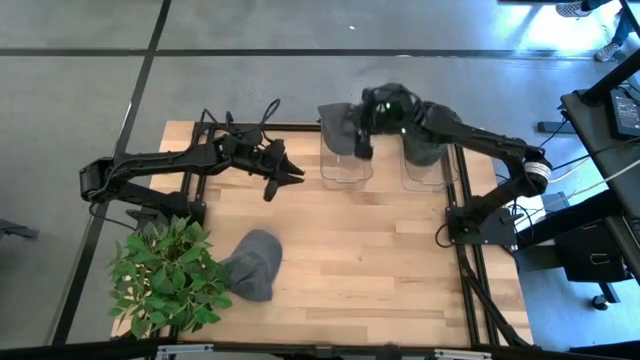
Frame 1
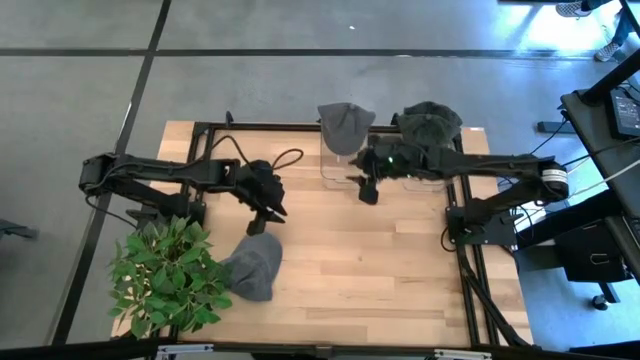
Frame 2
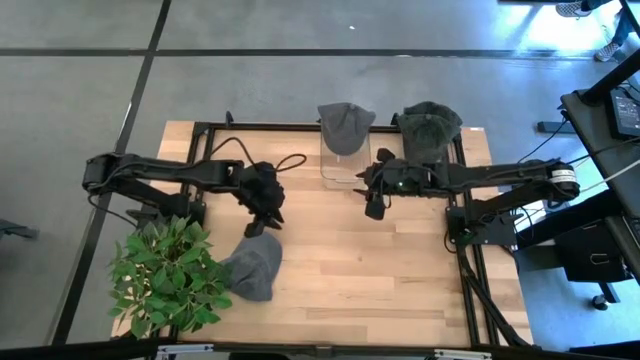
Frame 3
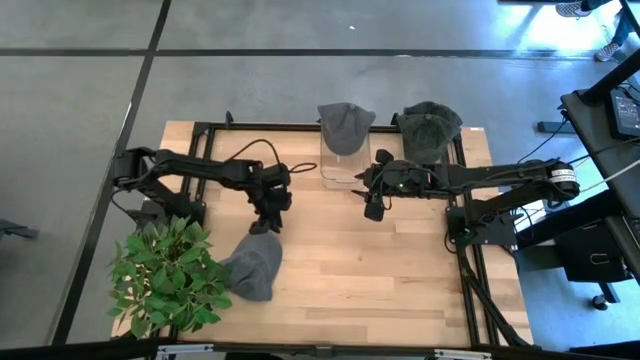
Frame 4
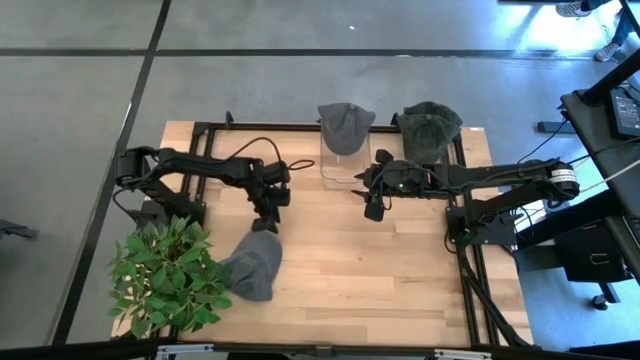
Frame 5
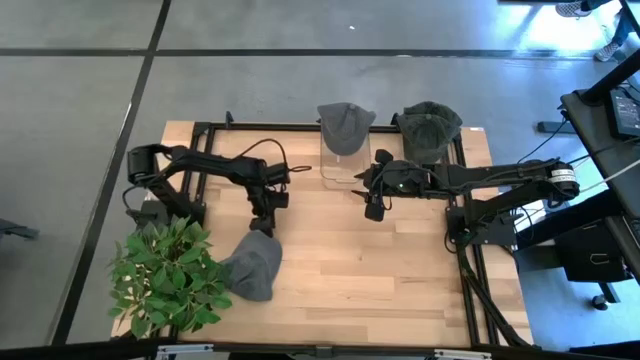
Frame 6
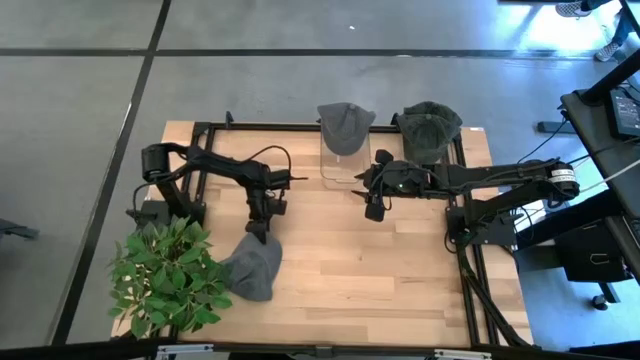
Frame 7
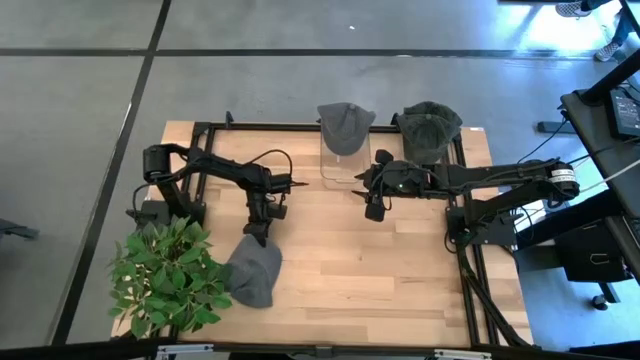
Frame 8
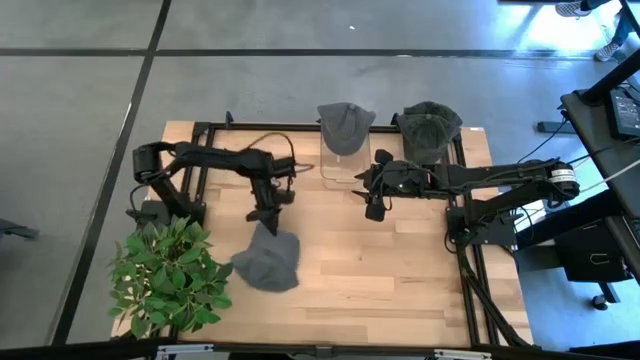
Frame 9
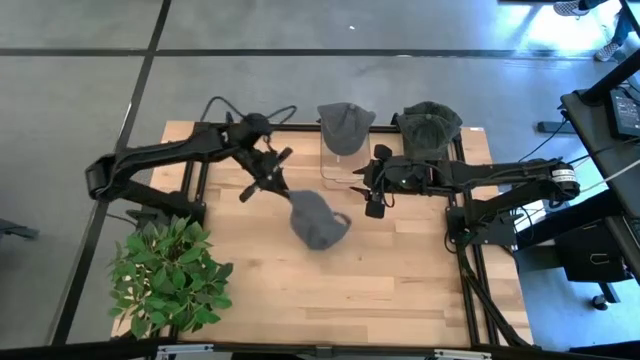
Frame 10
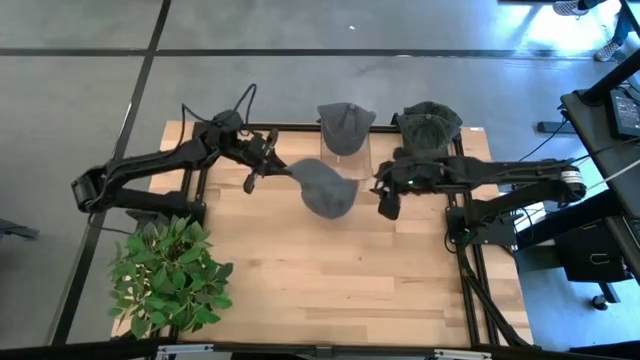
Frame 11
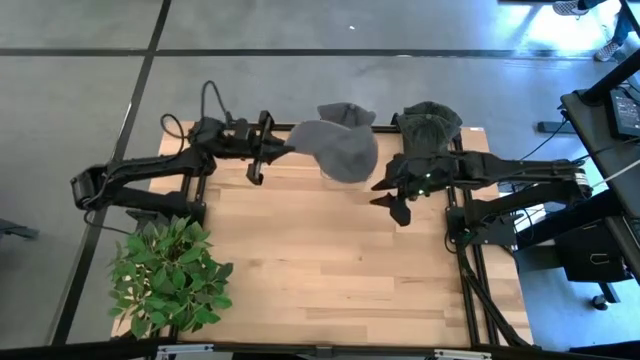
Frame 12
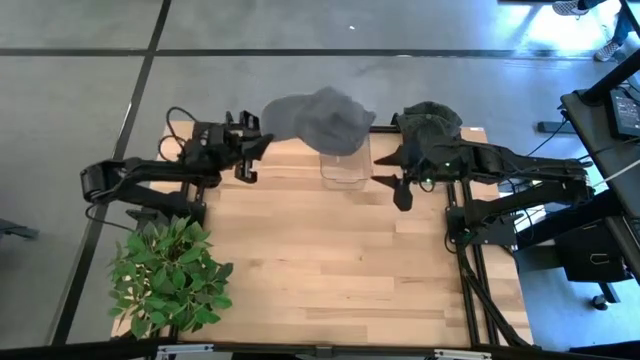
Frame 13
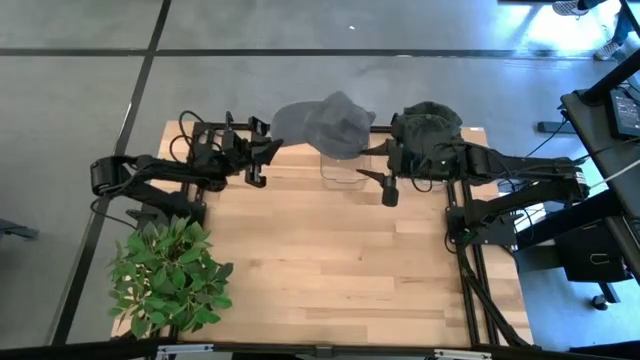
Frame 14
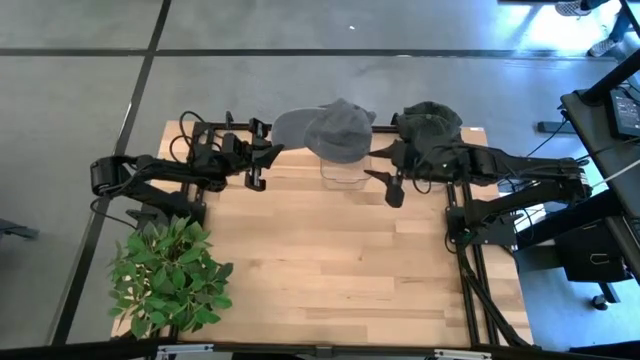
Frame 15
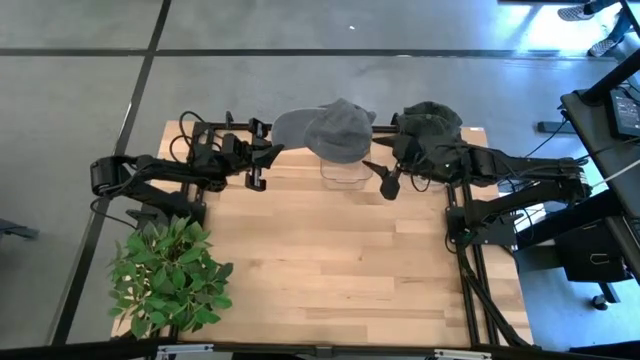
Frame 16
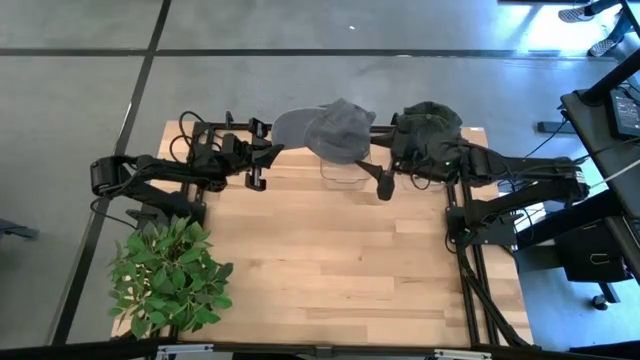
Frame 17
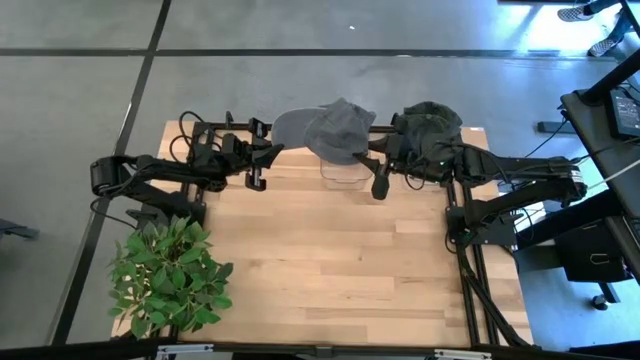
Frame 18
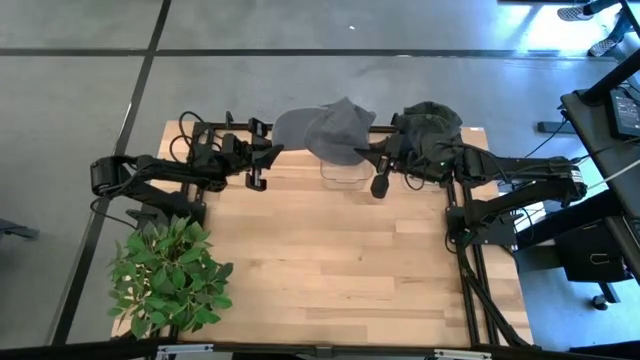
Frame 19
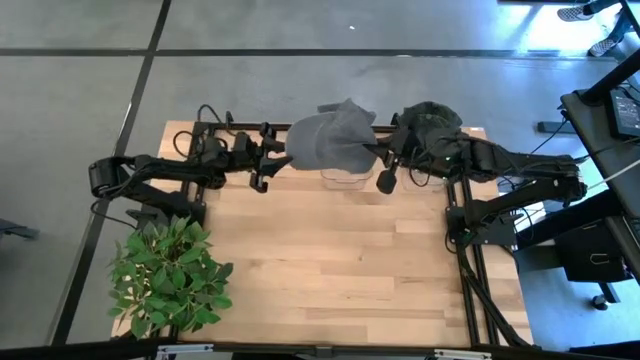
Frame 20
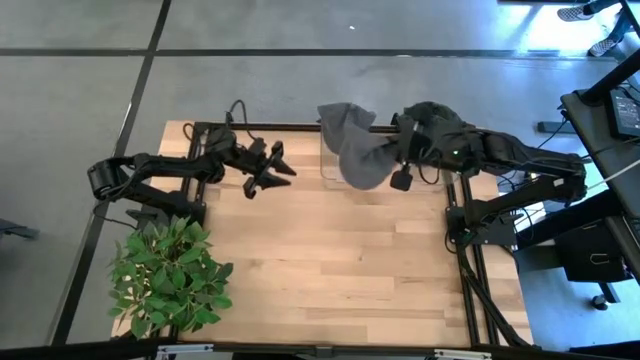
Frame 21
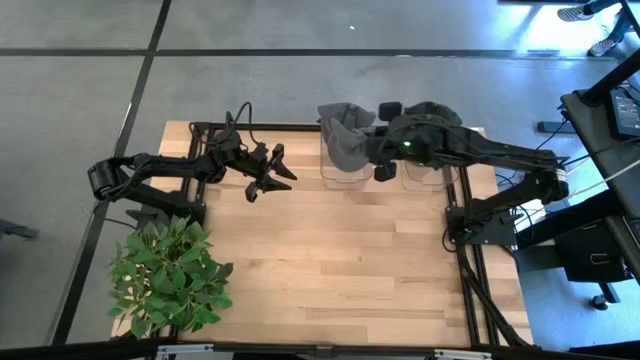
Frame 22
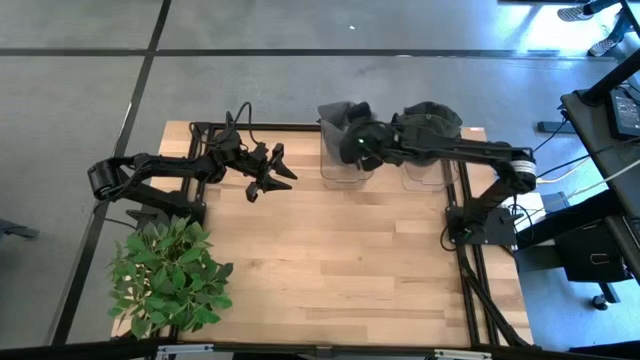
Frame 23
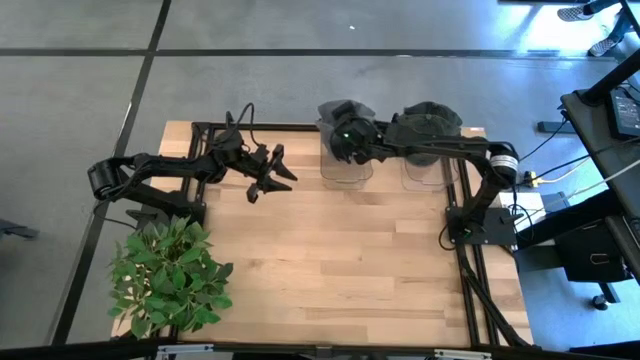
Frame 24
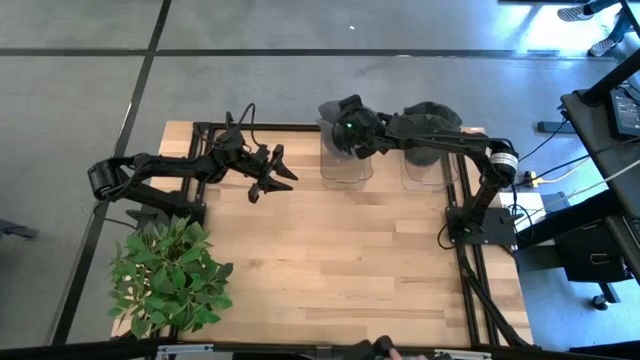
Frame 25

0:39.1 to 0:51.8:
Task: Pick & Place hat
Put the gray cap into the left transparent bin

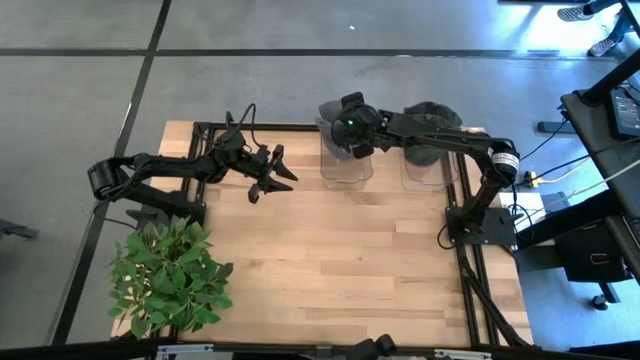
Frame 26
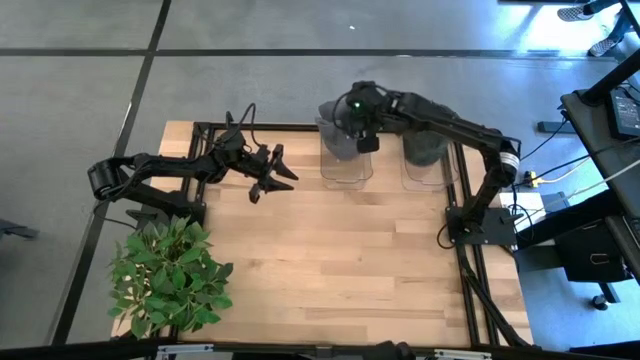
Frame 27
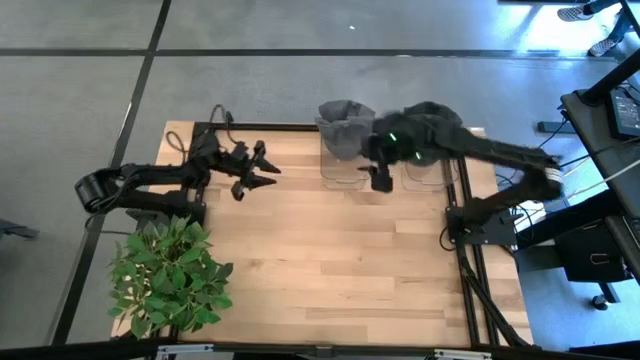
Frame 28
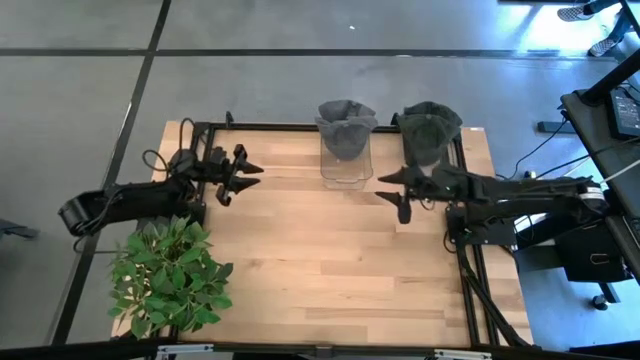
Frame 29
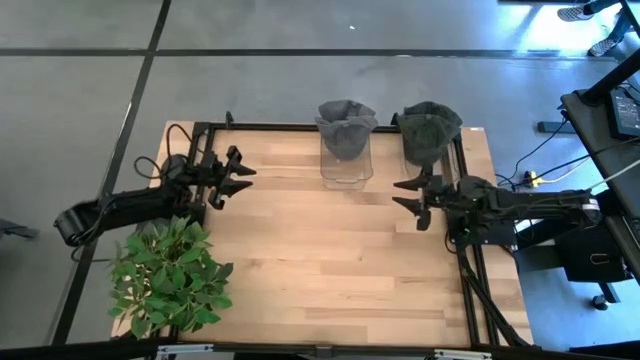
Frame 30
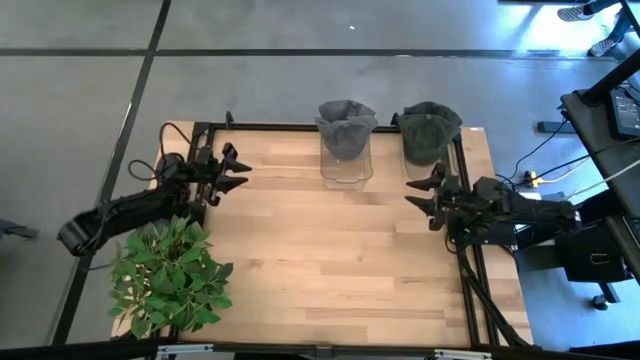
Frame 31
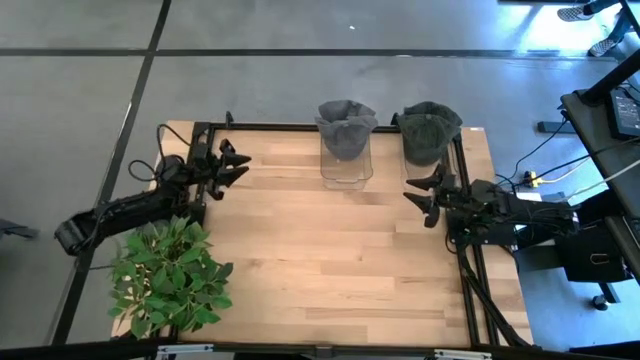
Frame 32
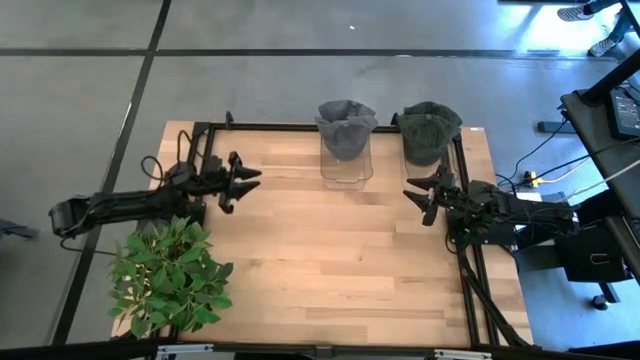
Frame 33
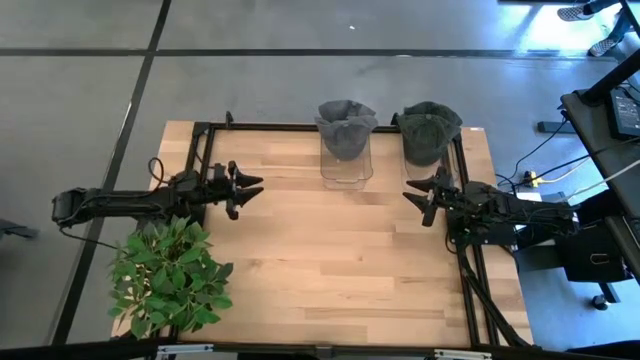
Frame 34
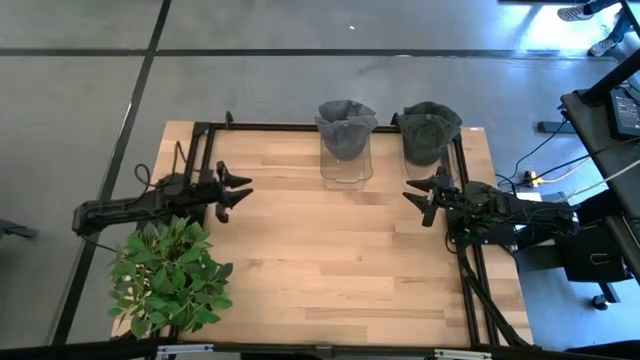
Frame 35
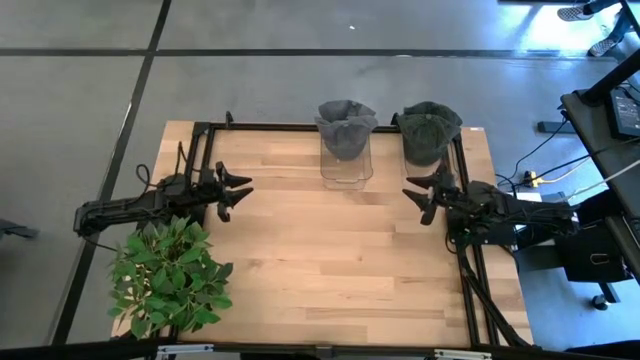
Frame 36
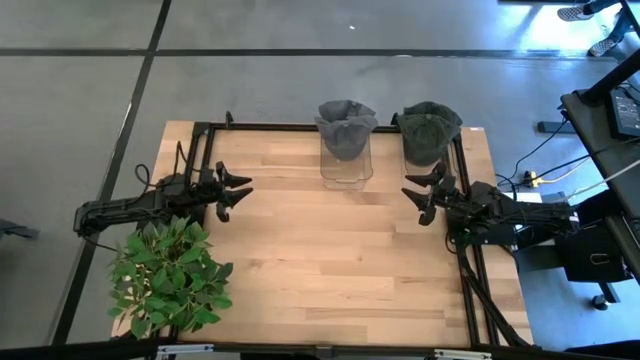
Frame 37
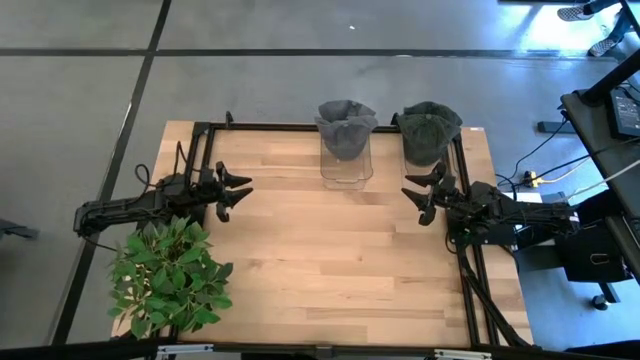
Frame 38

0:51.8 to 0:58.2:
Return to Home Position

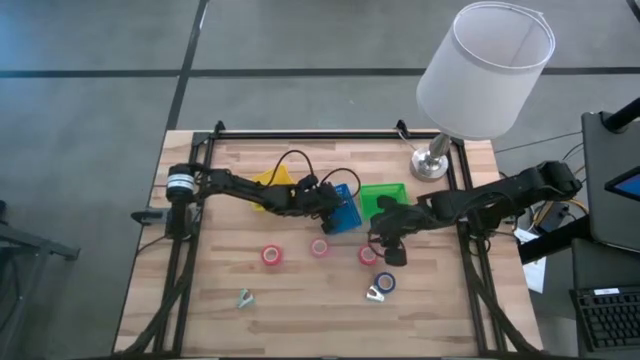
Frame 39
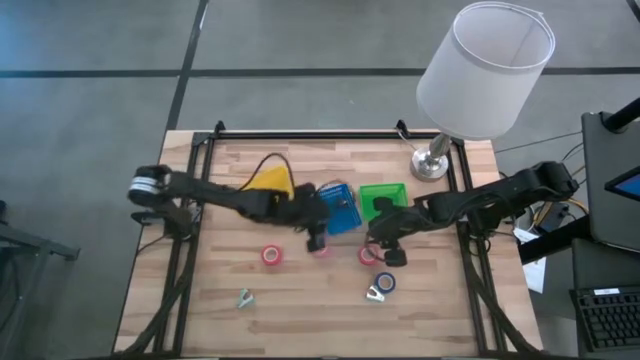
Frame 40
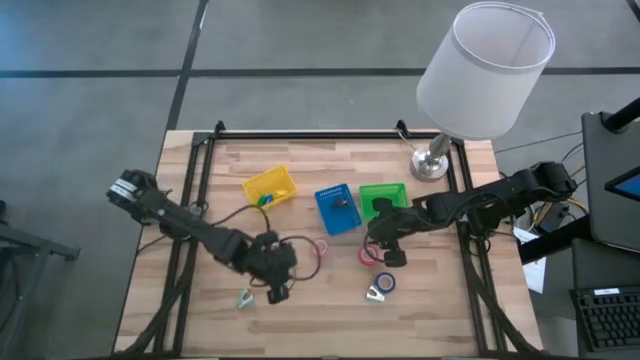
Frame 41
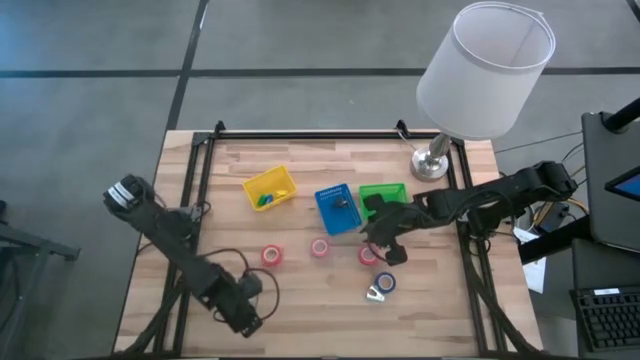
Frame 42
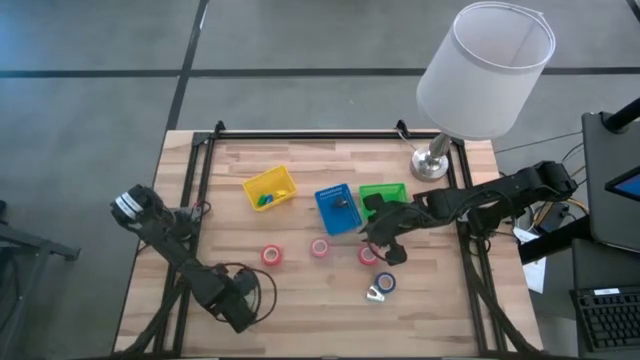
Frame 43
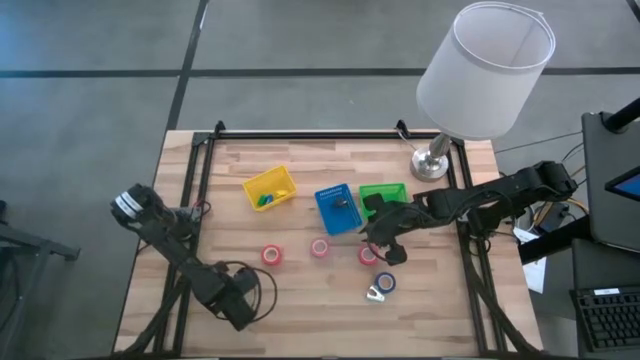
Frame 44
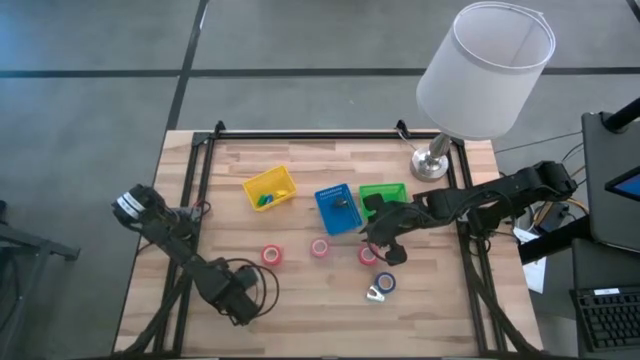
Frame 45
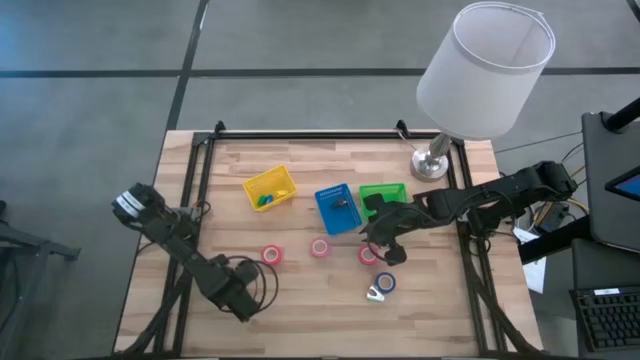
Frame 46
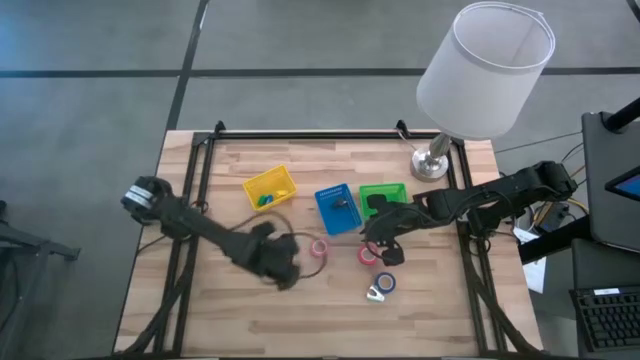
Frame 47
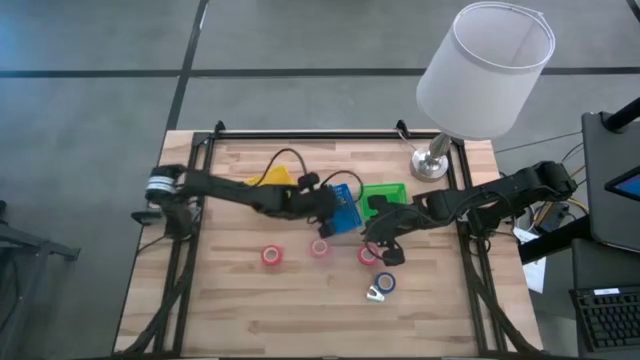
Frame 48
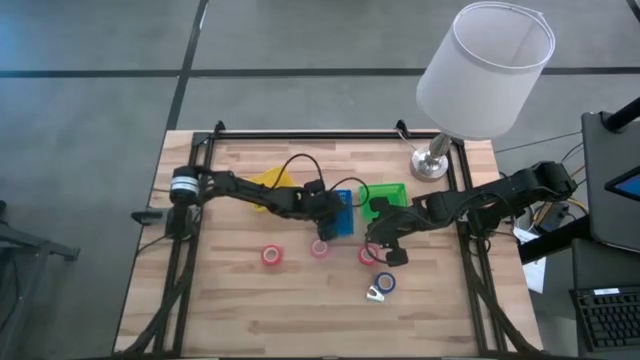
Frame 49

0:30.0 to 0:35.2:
Task: Pick and place Stapler, Stapler remover, tape
Put the left light blue staple remover into the blue basket
